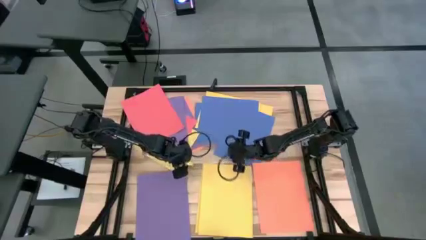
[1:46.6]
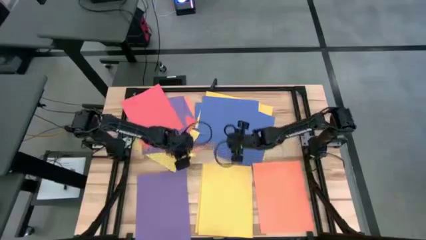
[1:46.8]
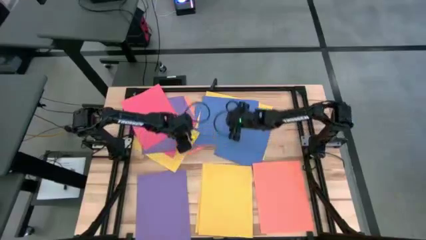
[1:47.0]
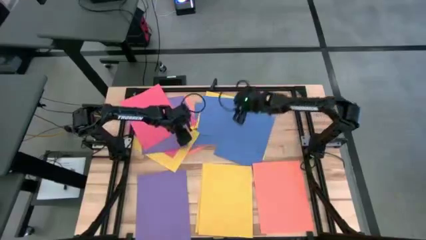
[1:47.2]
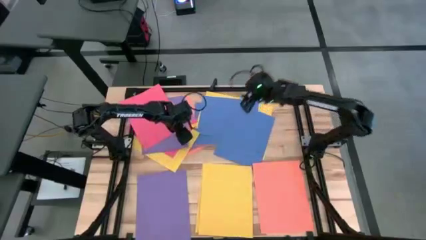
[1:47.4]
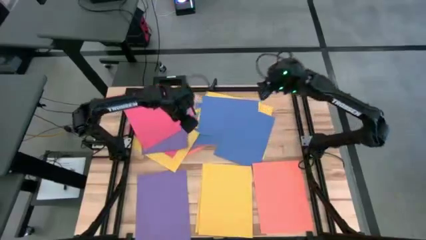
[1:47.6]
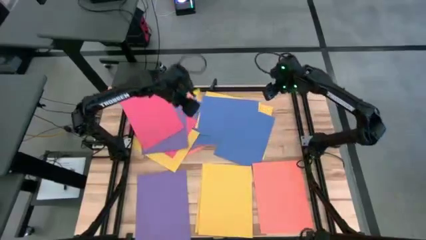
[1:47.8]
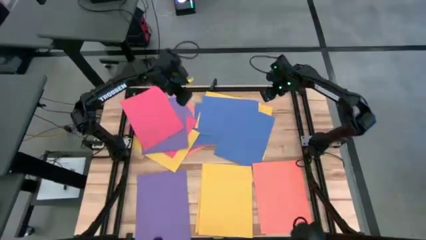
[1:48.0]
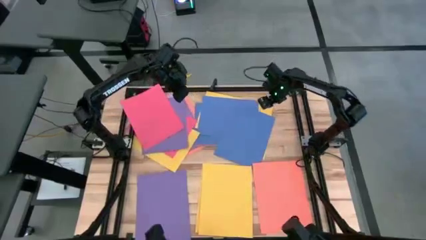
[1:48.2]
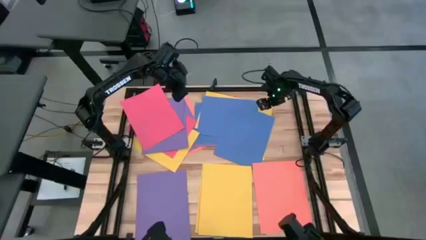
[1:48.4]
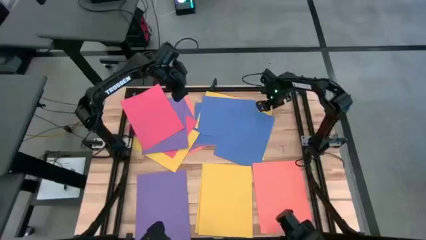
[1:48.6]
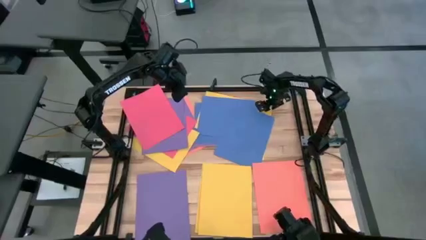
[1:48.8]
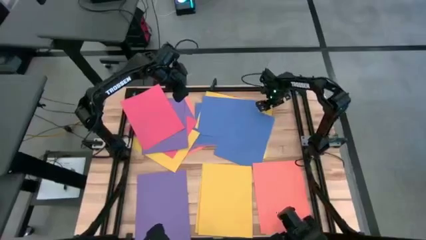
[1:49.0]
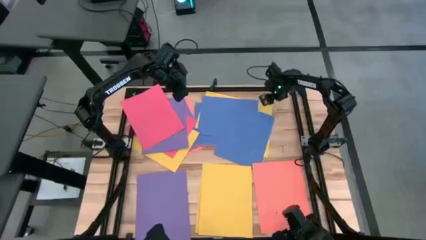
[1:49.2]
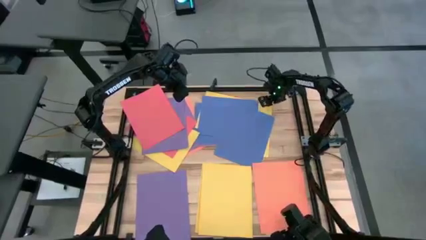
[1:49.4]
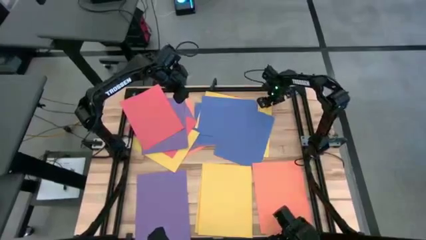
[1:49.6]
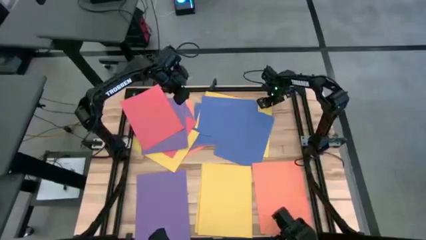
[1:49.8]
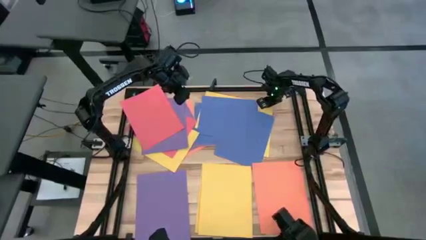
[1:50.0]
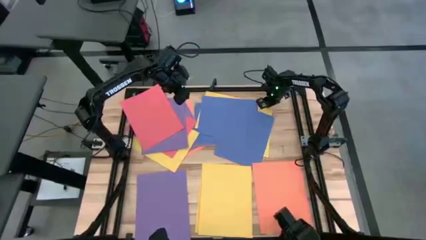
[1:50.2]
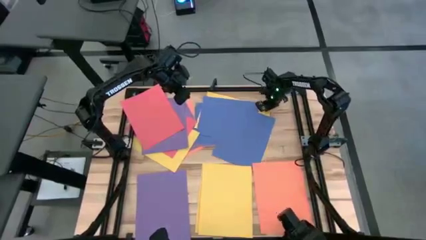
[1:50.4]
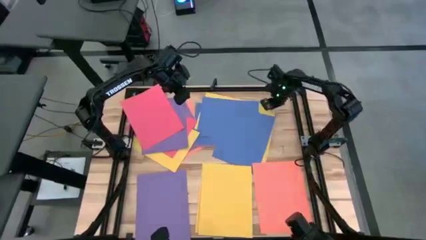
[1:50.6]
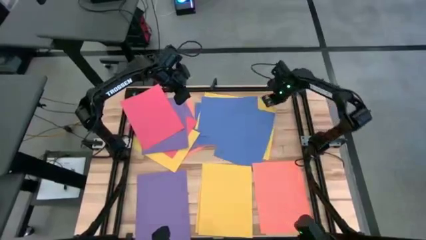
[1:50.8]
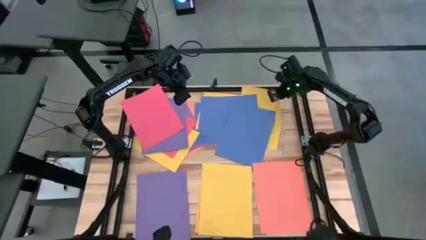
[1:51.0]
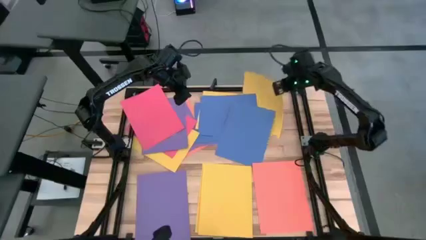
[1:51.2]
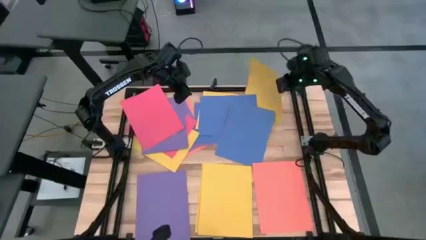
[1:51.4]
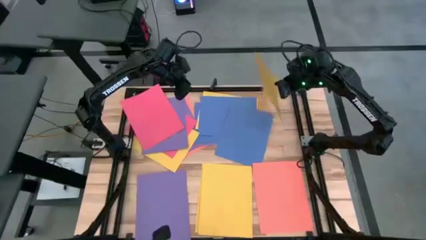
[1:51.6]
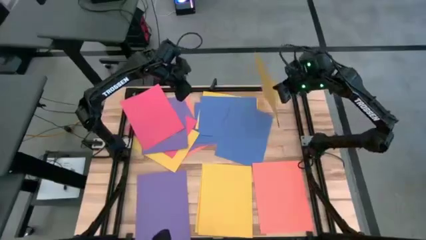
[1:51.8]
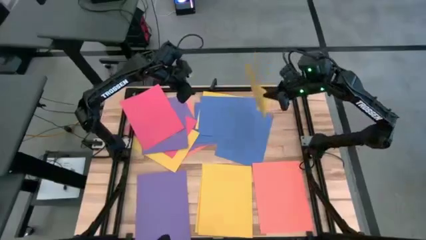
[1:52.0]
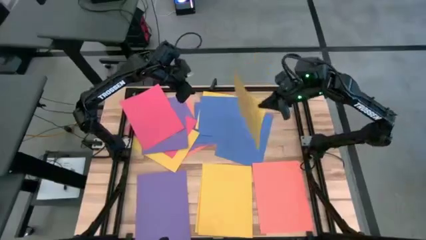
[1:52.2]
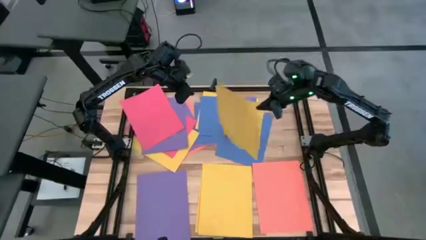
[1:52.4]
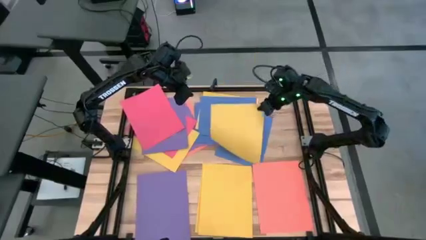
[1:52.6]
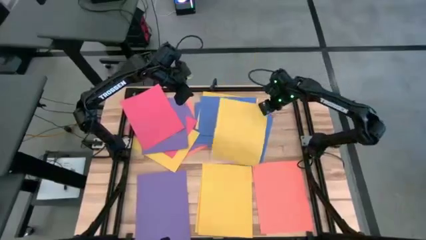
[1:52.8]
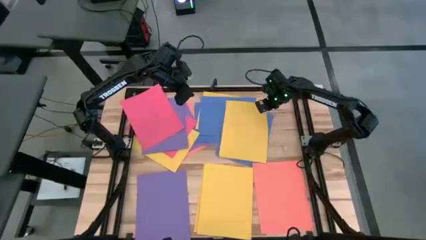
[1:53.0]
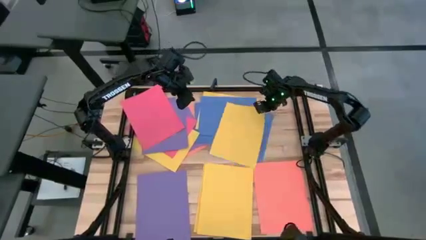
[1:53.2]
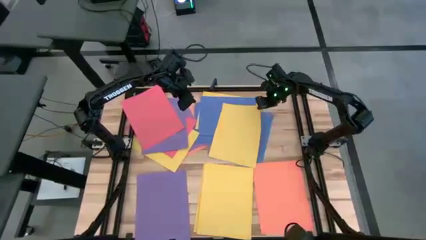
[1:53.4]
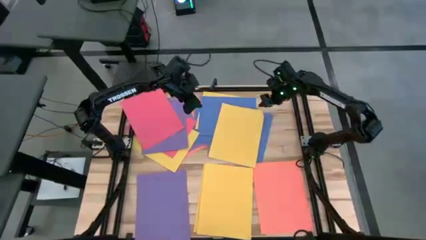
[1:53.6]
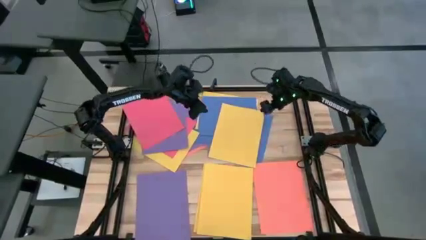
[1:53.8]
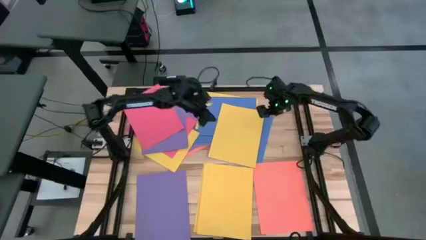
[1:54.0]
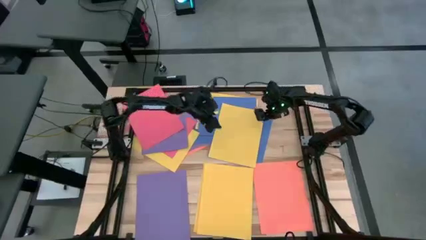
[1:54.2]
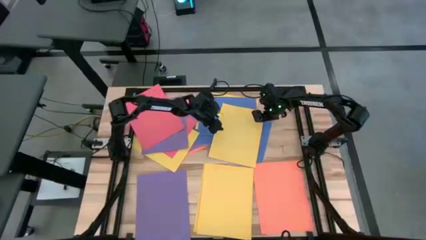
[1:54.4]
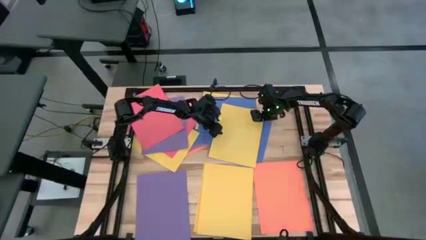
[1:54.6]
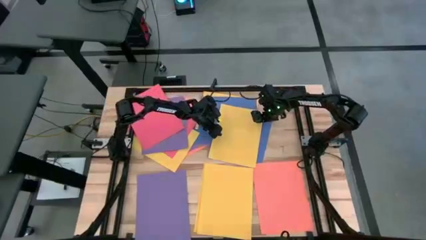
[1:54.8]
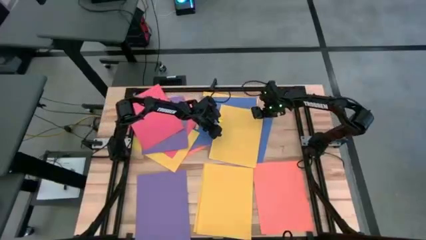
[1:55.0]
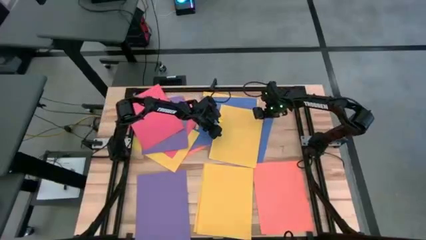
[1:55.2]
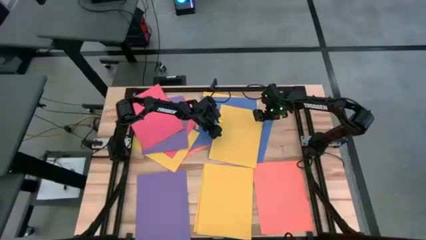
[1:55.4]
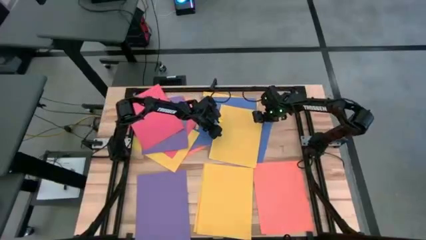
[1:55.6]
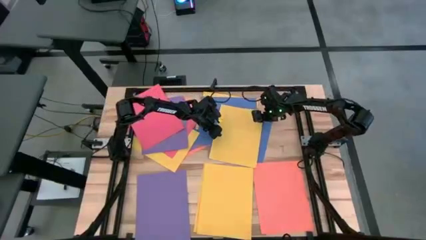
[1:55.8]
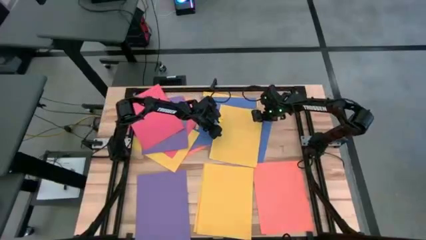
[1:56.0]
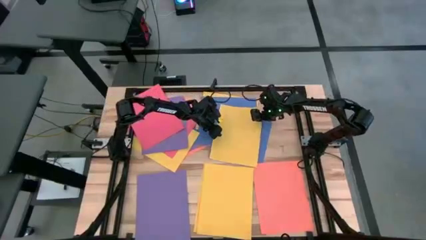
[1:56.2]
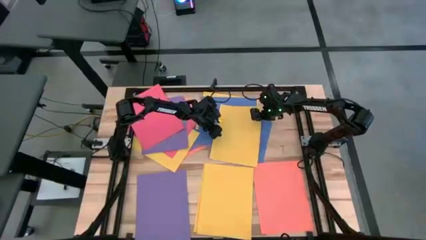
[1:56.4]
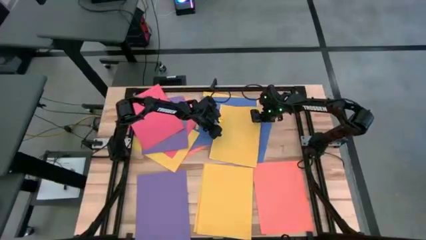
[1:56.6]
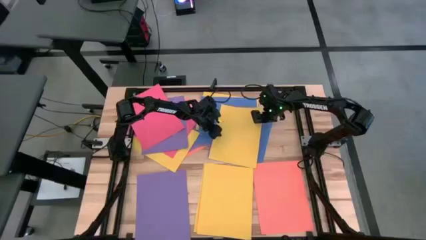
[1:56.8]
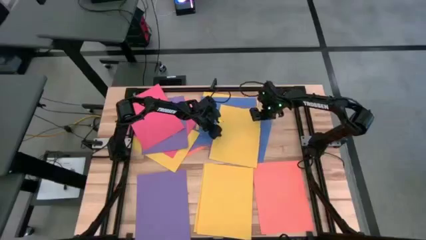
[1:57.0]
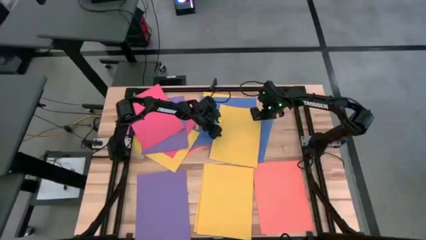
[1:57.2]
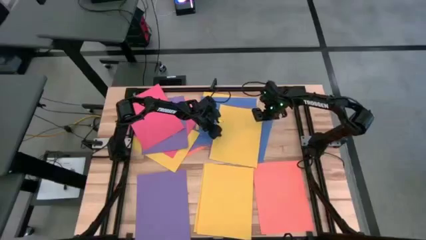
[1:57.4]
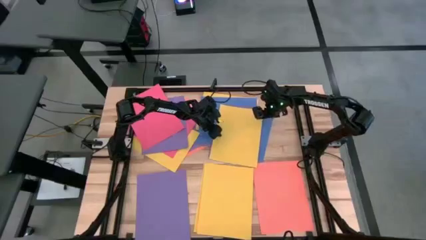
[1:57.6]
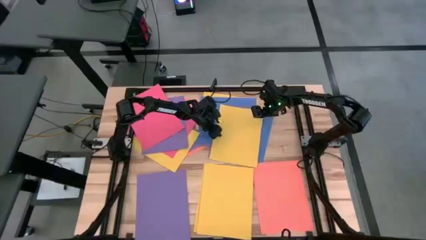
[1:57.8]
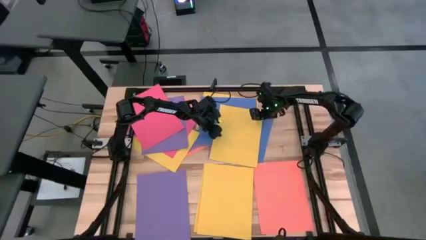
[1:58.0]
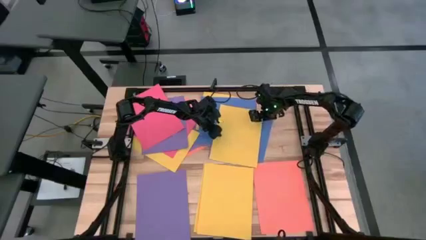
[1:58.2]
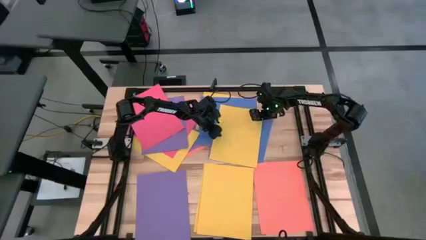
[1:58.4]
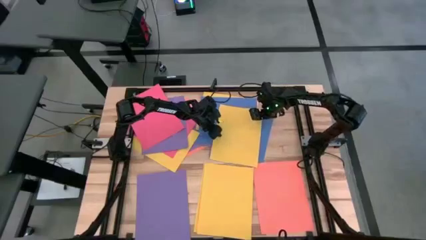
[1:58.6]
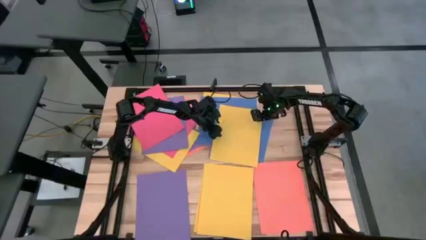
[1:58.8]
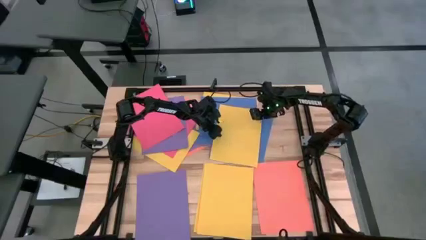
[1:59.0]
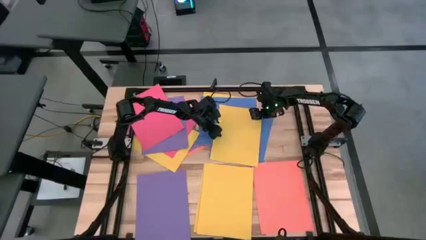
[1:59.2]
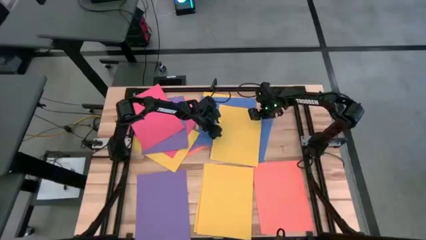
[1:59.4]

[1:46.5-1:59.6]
Task: Organize paper
Stack the yellow paper on top of the yellow paper
